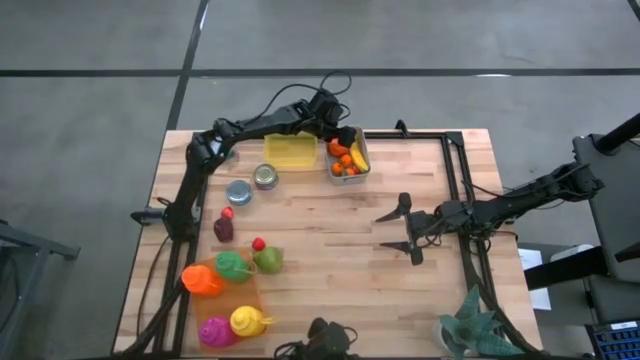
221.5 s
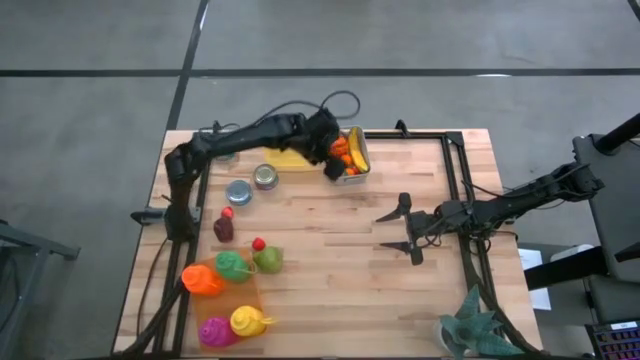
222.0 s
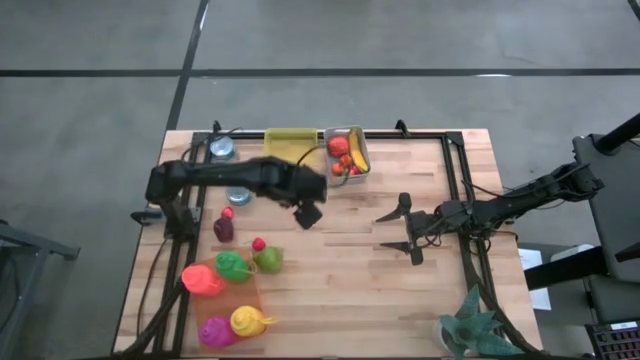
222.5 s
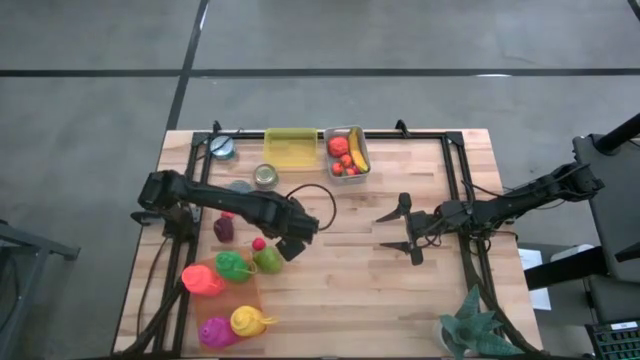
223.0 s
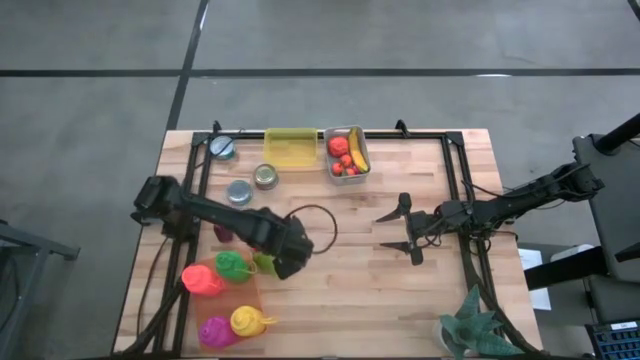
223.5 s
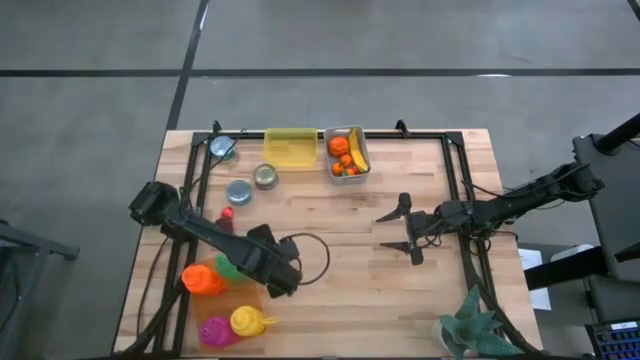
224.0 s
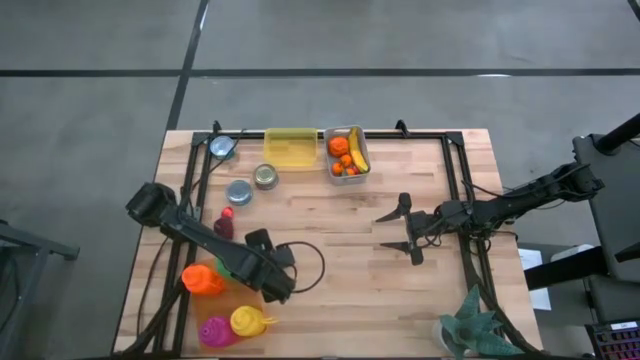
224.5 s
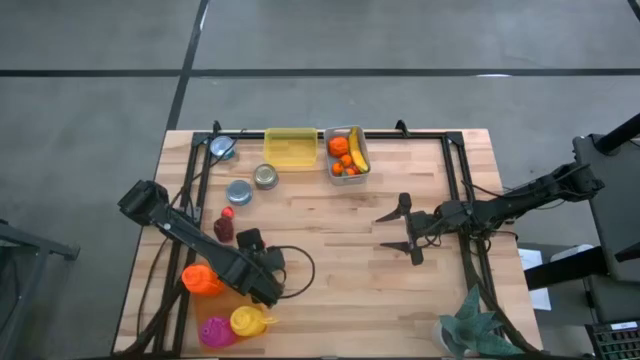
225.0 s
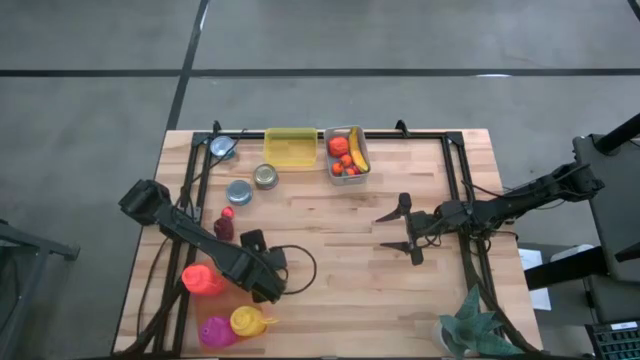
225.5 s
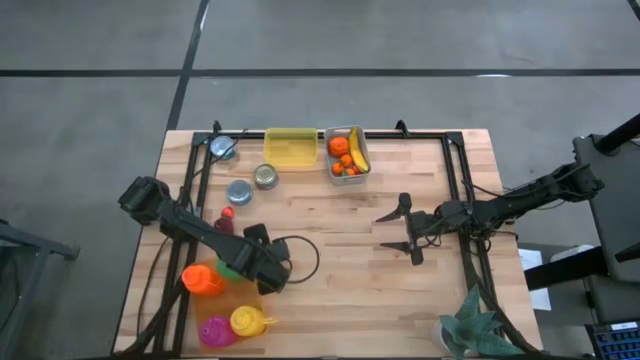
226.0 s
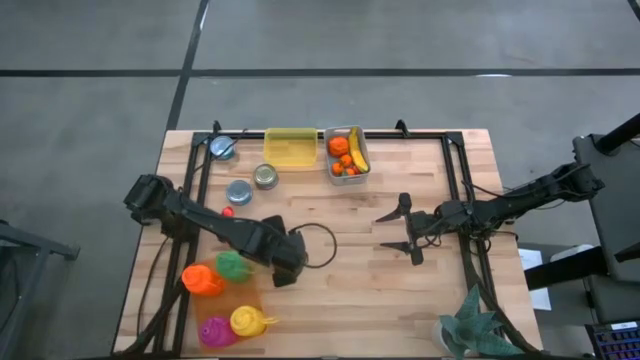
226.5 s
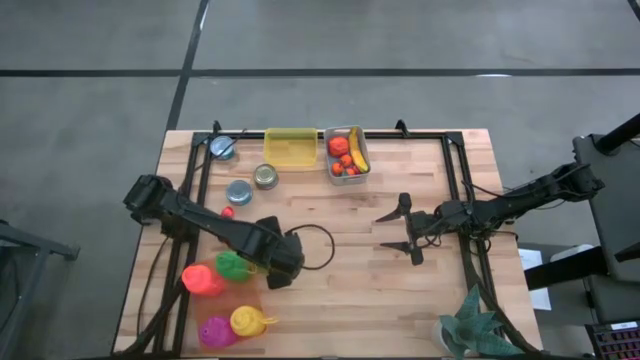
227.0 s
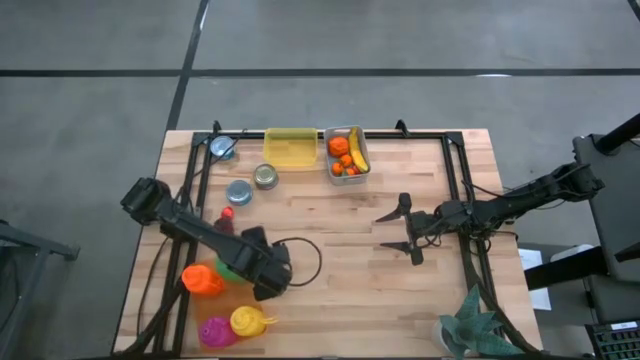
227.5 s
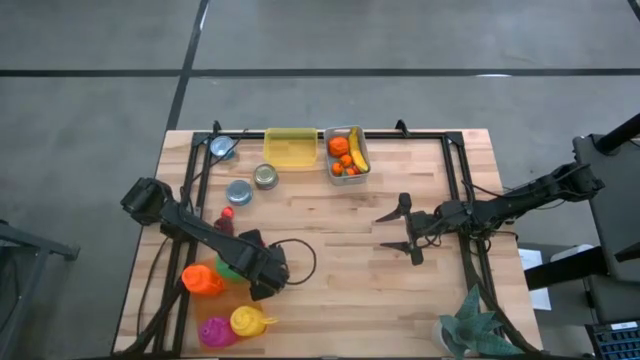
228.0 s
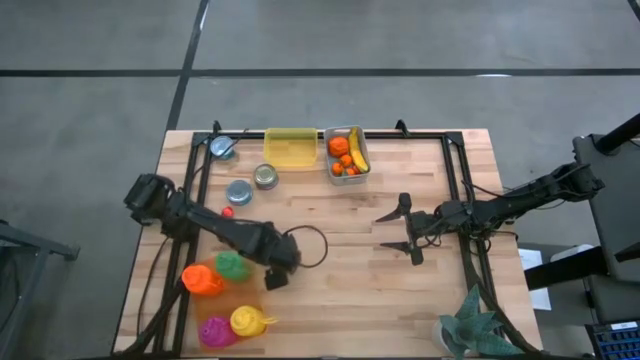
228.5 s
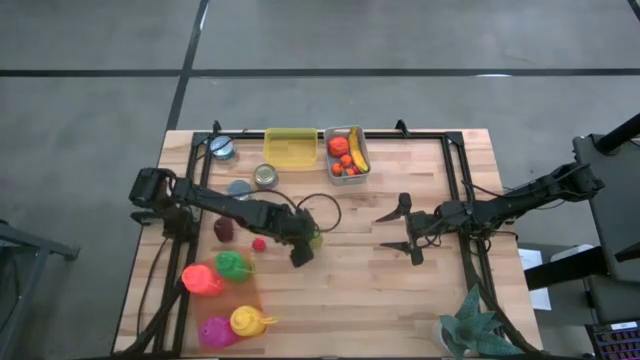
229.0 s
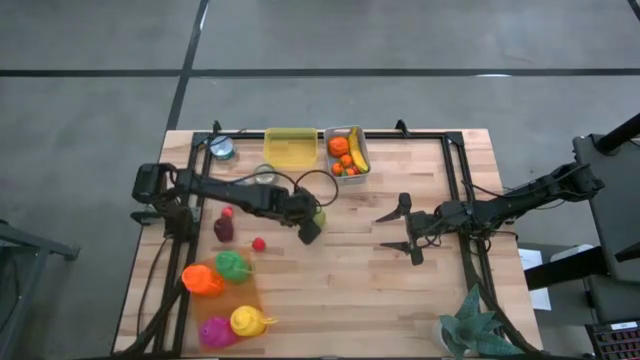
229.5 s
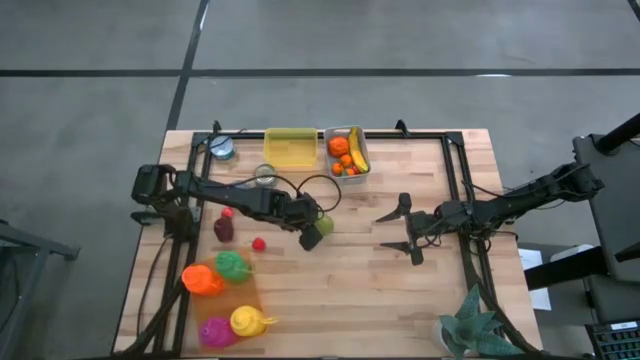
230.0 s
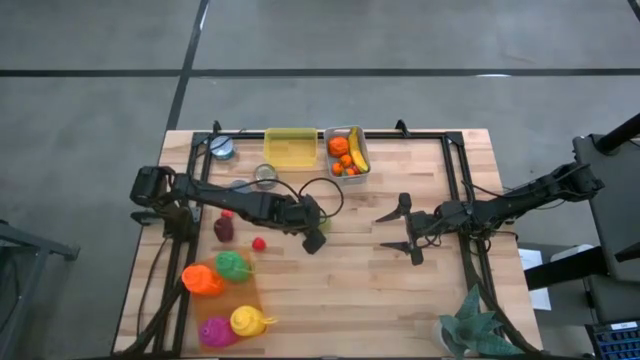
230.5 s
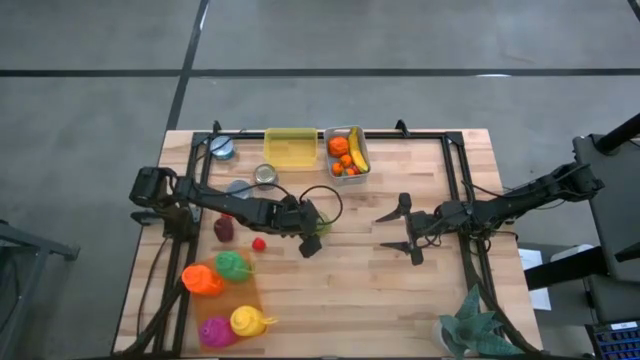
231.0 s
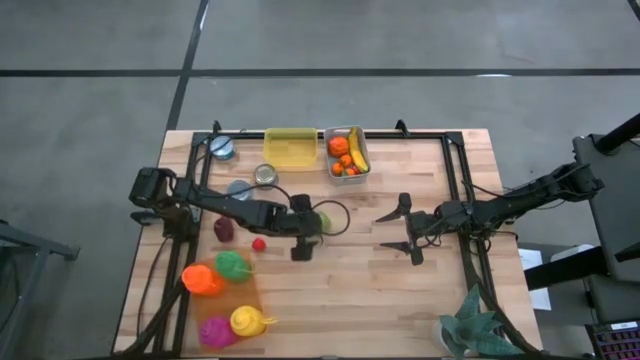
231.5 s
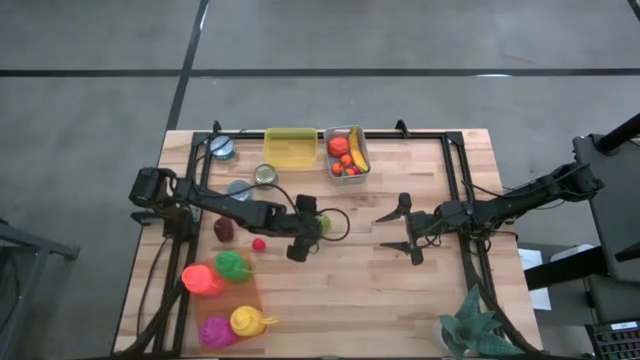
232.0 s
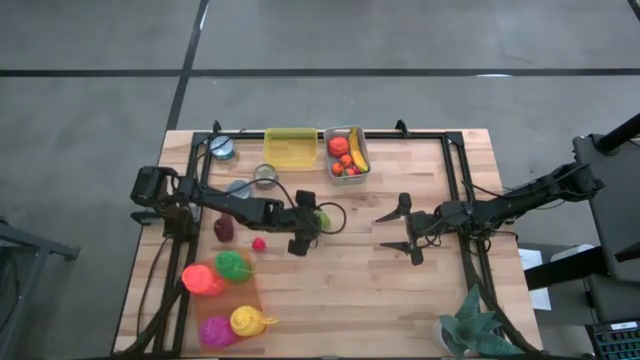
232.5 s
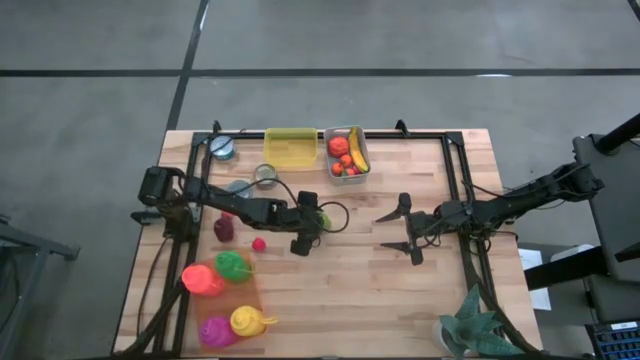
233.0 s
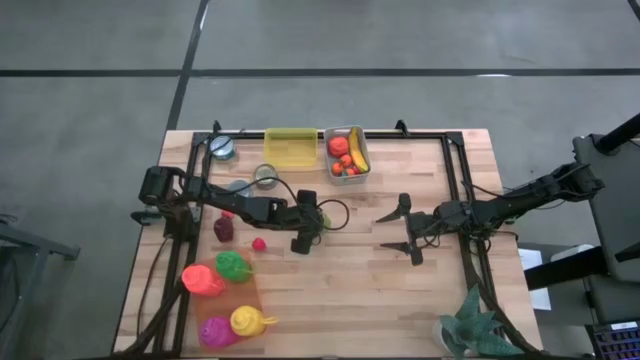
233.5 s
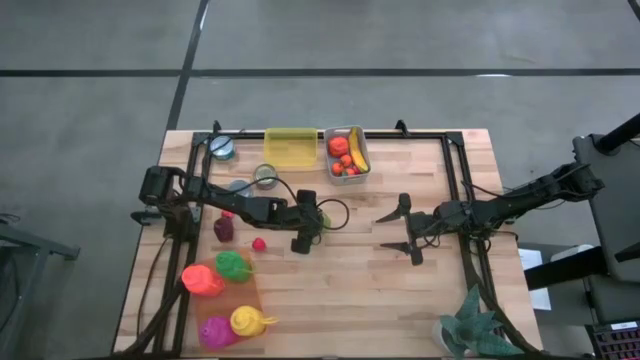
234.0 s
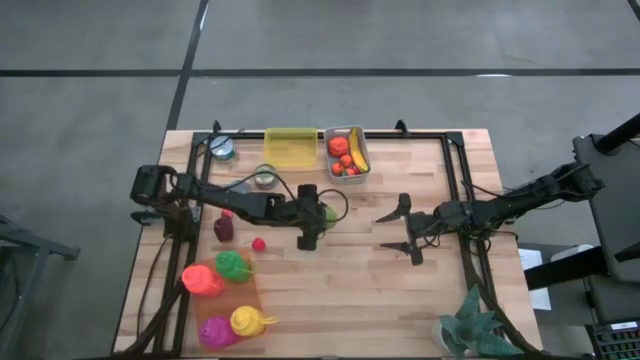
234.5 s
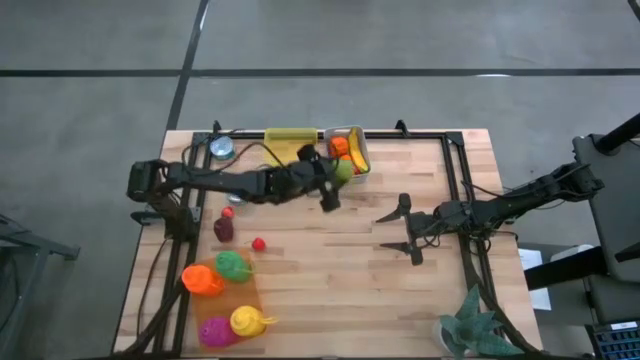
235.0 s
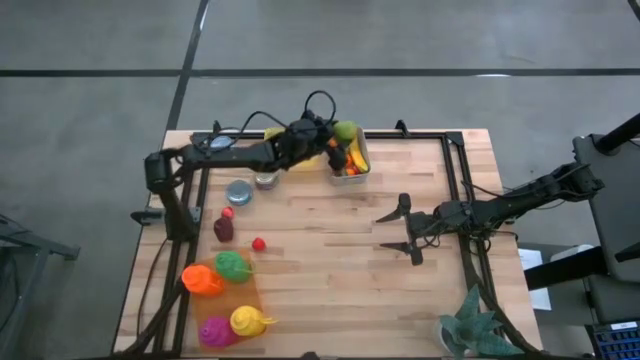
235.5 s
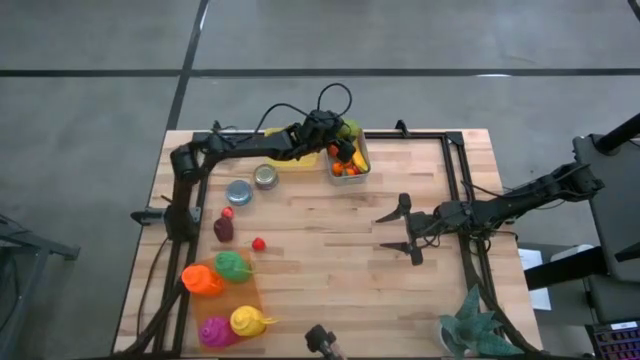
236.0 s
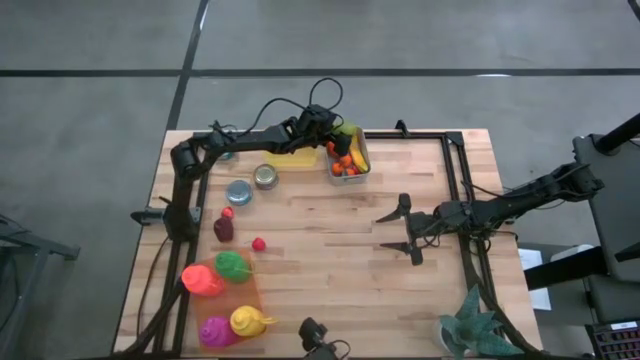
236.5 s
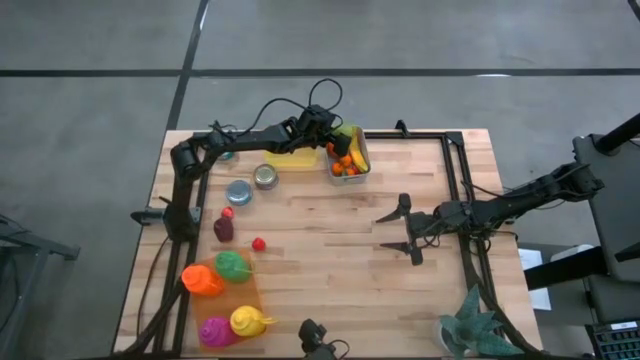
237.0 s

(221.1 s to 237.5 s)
Task: Pick & Place Food Item
Put the green pear into the gray bin

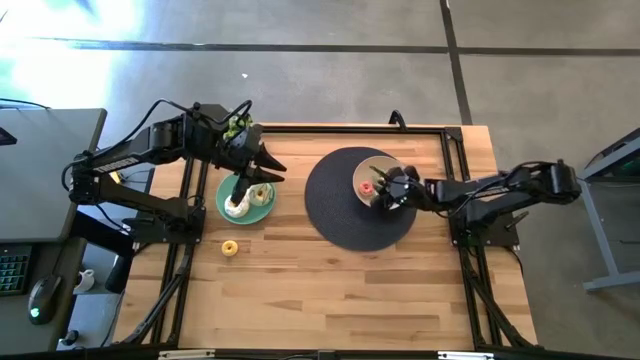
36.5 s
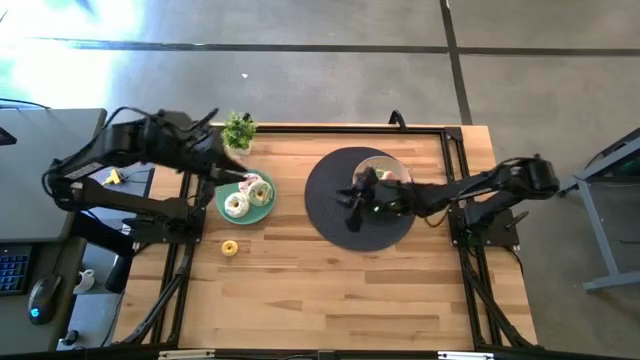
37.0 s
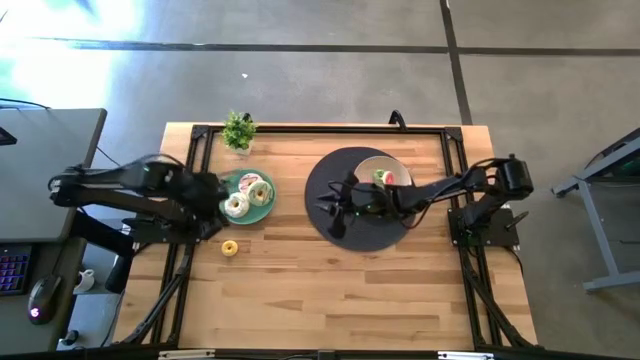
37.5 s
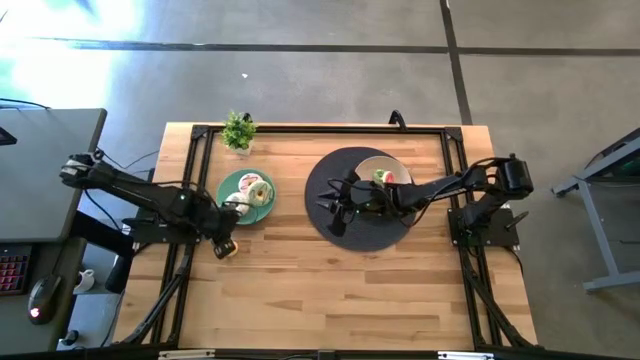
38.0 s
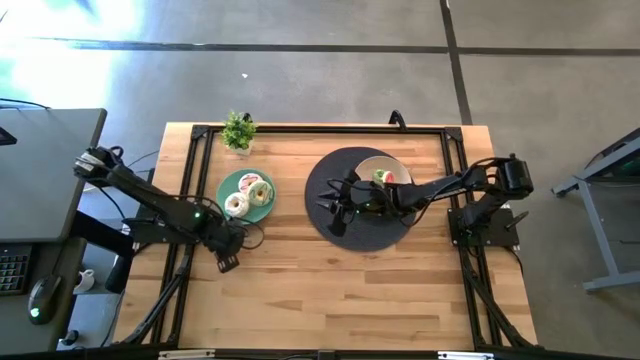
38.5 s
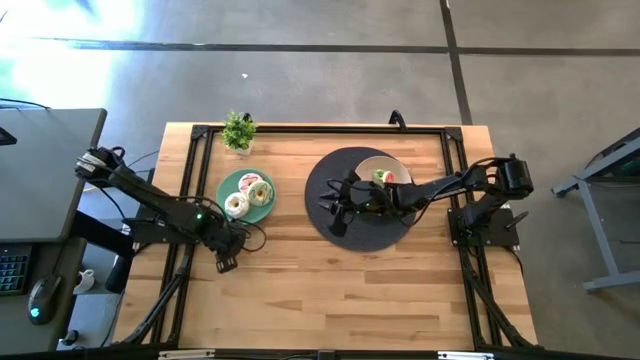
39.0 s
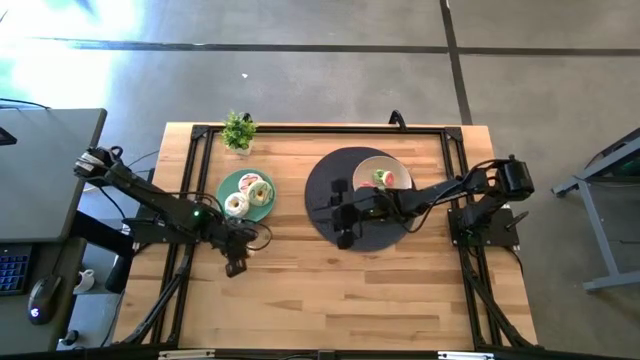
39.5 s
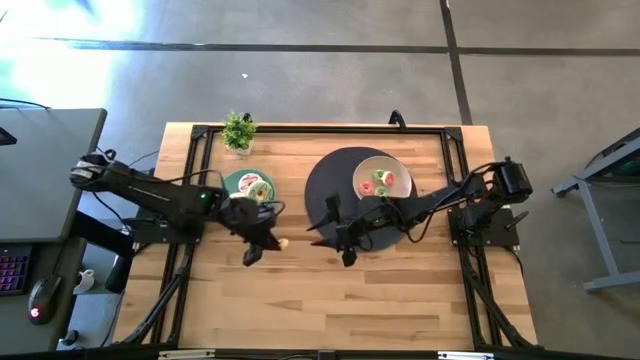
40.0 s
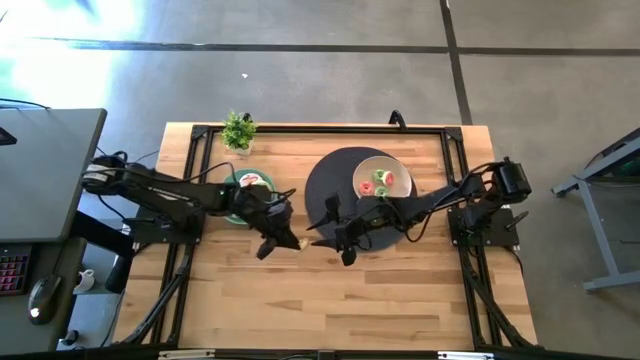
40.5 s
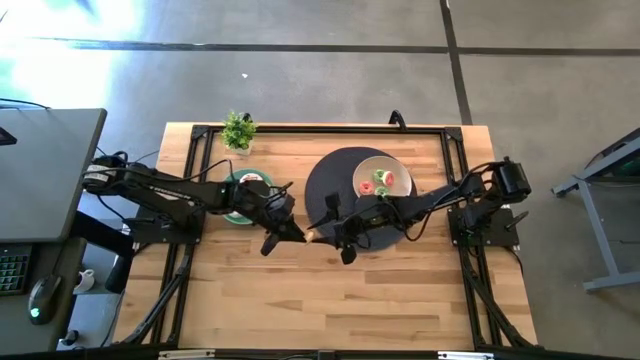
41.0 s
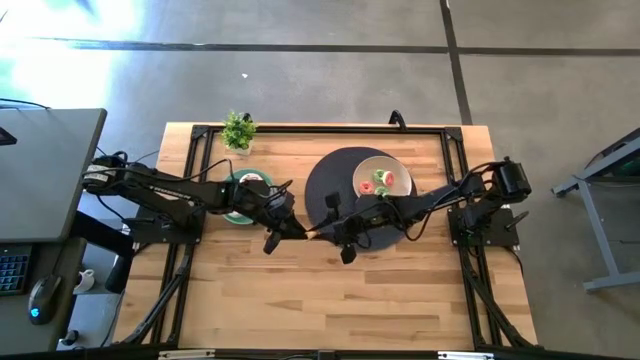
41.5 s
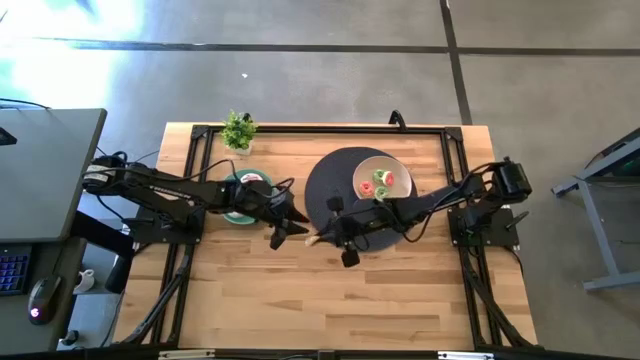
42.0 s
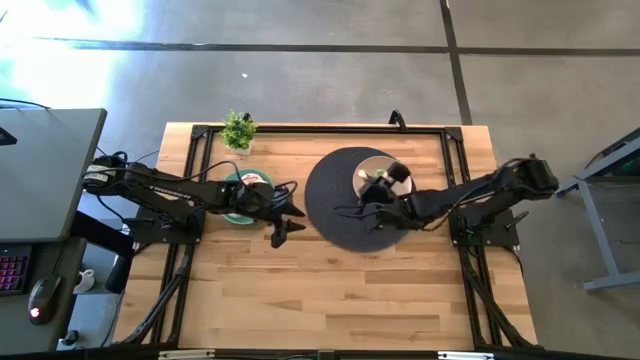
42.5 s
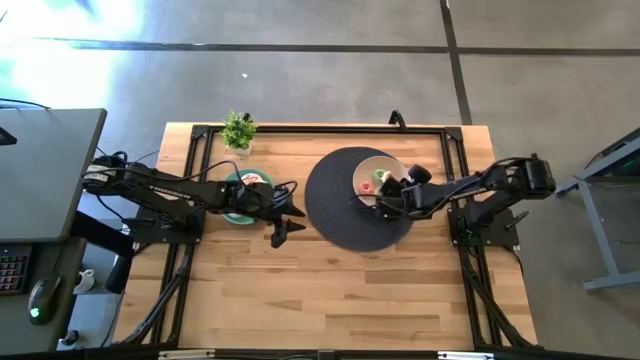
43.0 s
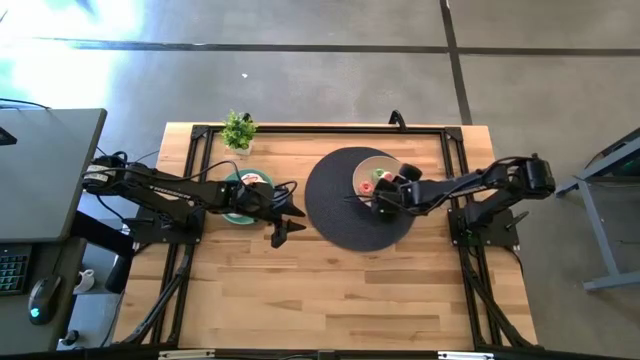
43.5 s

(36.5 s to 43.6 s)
Task: Pick & Place donuts
Put the yellow donut into the white plate
